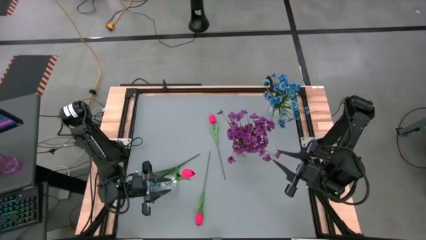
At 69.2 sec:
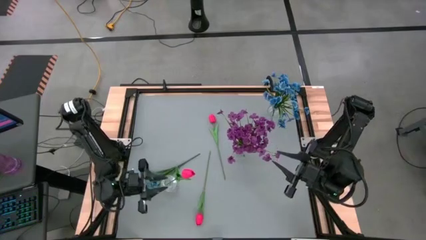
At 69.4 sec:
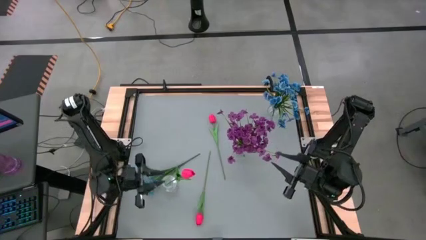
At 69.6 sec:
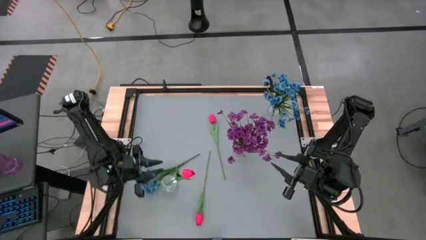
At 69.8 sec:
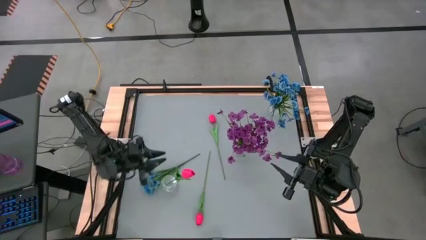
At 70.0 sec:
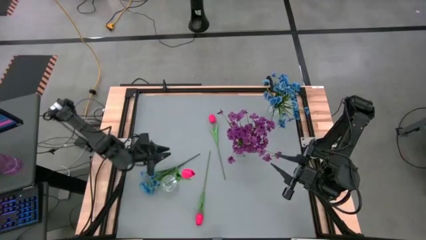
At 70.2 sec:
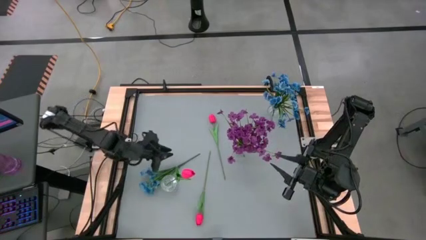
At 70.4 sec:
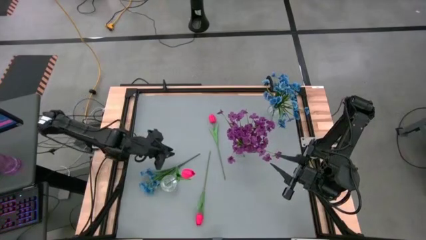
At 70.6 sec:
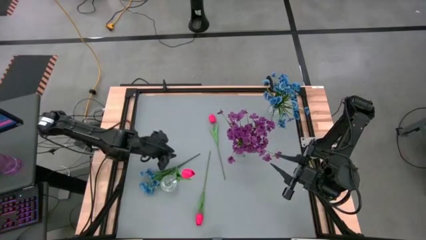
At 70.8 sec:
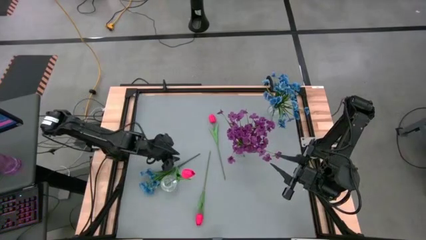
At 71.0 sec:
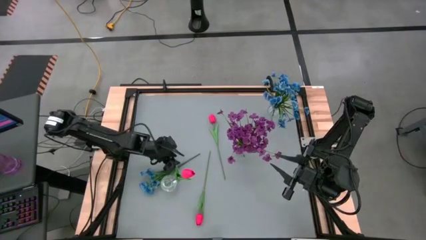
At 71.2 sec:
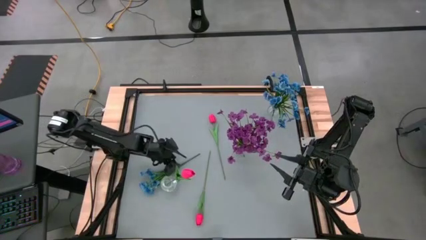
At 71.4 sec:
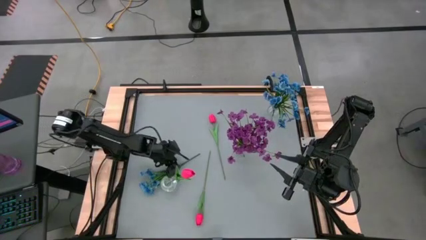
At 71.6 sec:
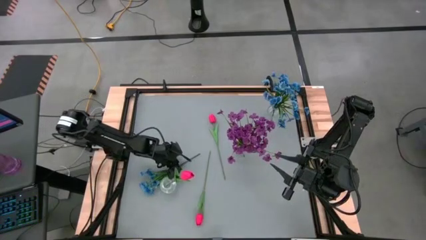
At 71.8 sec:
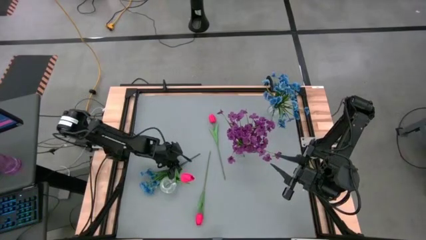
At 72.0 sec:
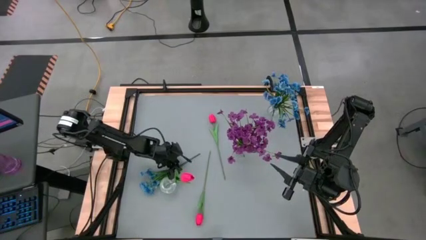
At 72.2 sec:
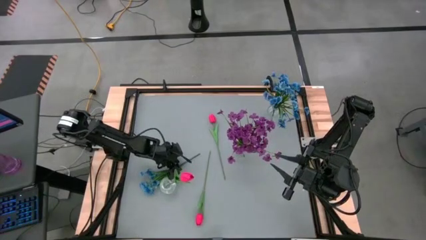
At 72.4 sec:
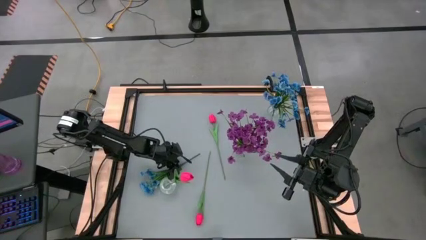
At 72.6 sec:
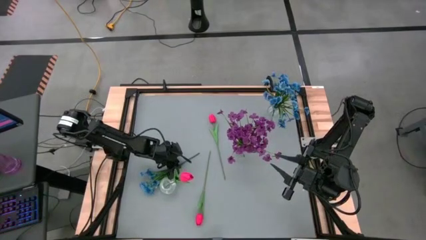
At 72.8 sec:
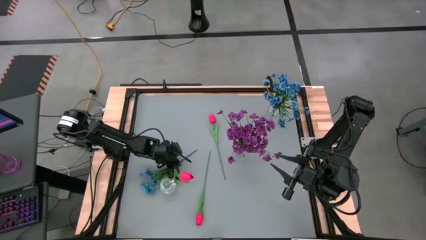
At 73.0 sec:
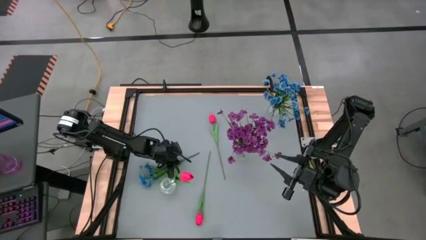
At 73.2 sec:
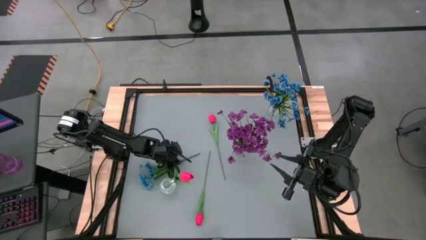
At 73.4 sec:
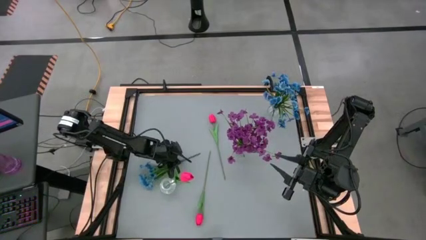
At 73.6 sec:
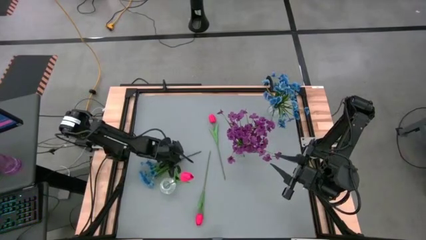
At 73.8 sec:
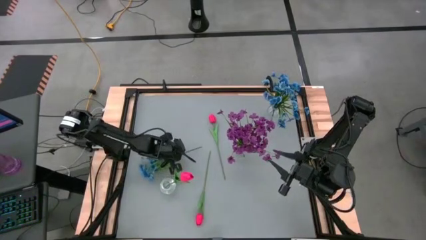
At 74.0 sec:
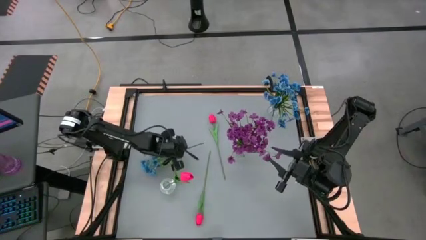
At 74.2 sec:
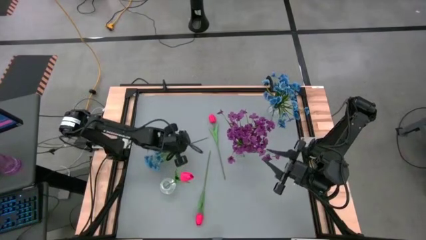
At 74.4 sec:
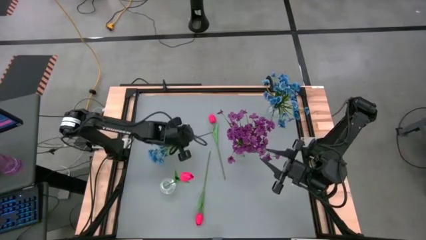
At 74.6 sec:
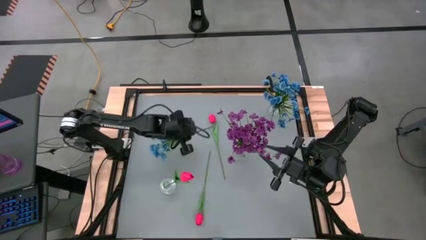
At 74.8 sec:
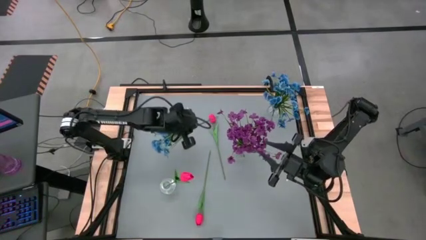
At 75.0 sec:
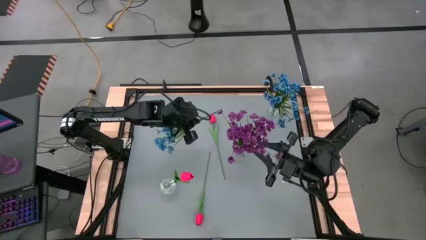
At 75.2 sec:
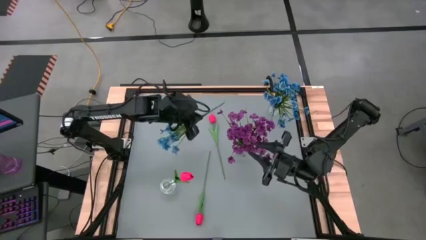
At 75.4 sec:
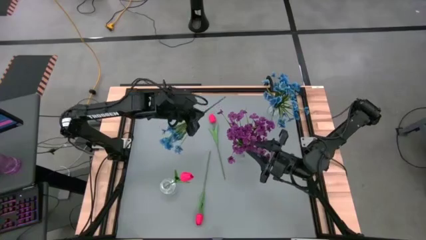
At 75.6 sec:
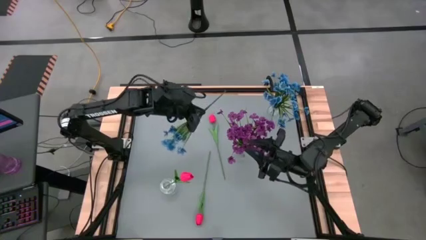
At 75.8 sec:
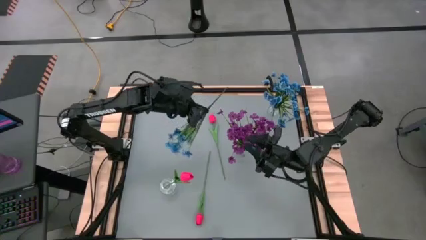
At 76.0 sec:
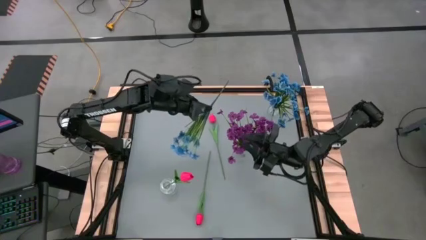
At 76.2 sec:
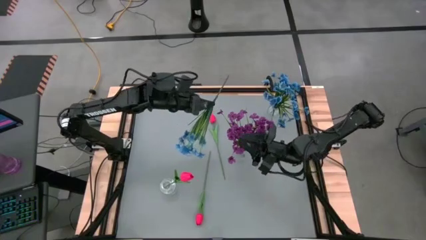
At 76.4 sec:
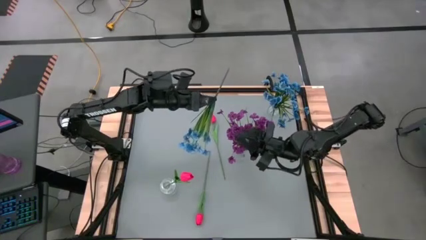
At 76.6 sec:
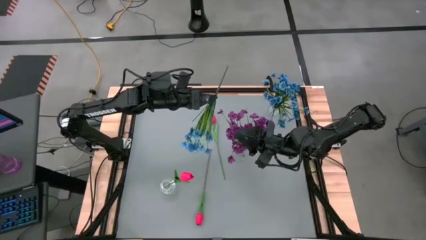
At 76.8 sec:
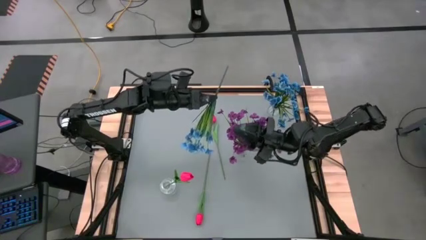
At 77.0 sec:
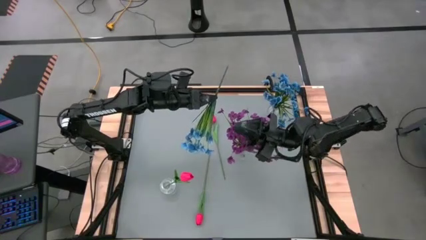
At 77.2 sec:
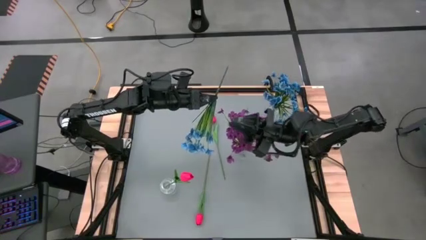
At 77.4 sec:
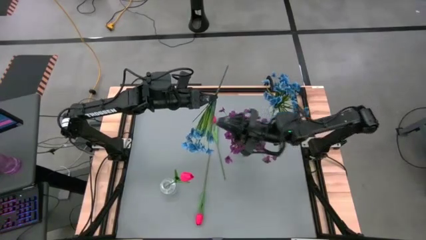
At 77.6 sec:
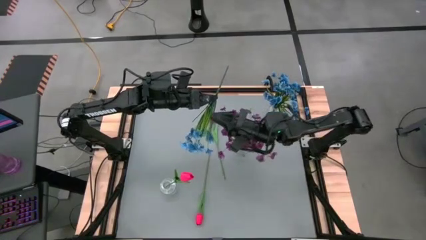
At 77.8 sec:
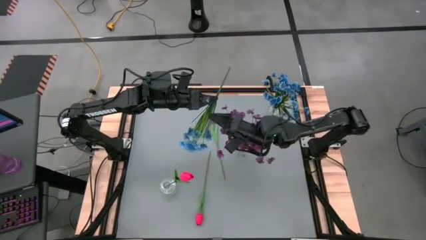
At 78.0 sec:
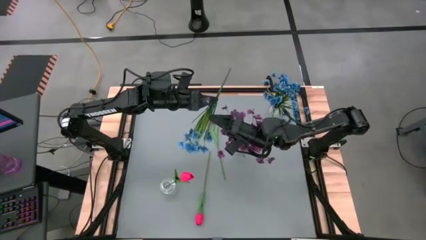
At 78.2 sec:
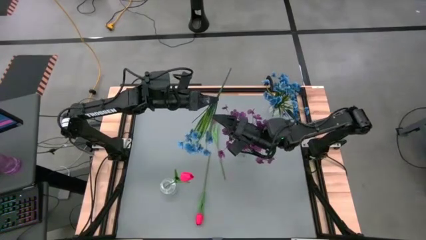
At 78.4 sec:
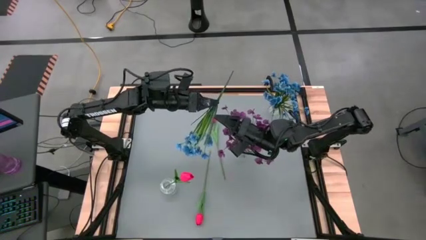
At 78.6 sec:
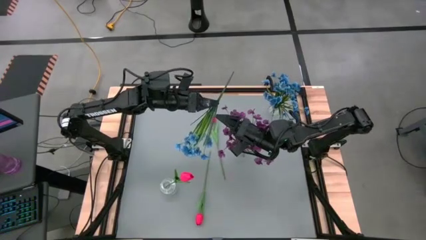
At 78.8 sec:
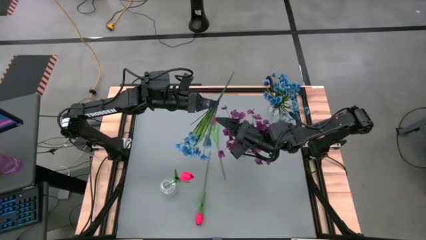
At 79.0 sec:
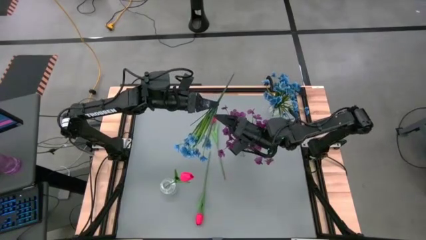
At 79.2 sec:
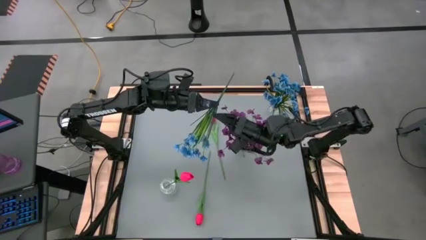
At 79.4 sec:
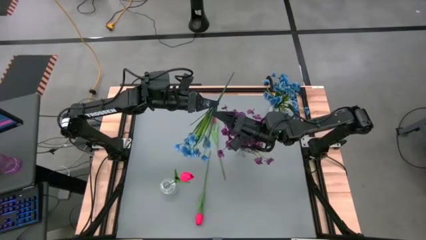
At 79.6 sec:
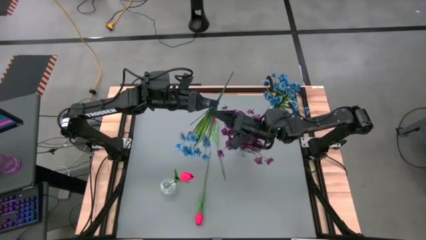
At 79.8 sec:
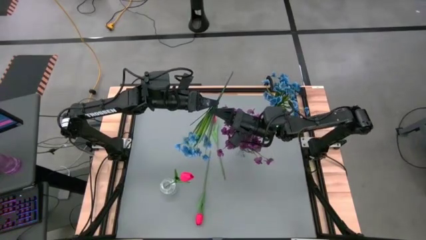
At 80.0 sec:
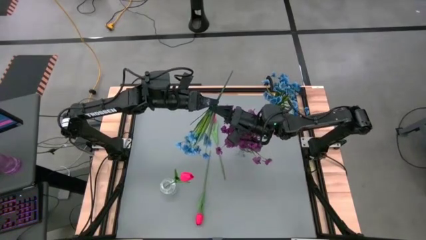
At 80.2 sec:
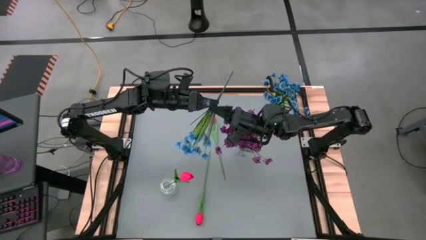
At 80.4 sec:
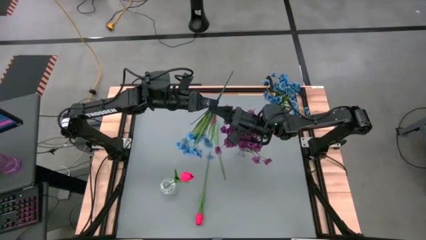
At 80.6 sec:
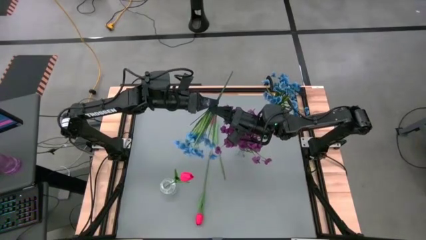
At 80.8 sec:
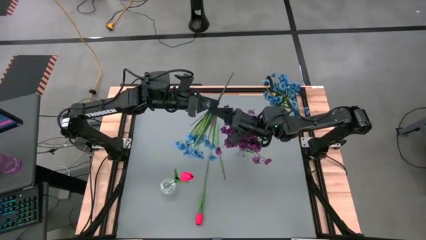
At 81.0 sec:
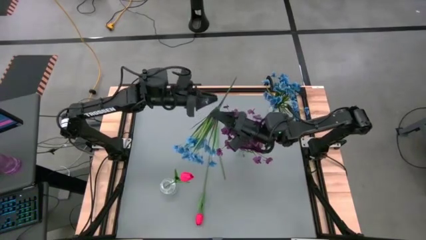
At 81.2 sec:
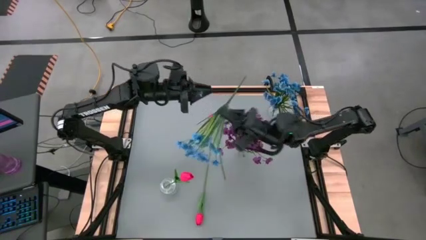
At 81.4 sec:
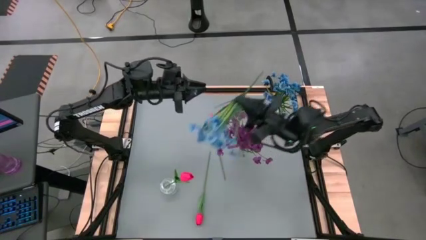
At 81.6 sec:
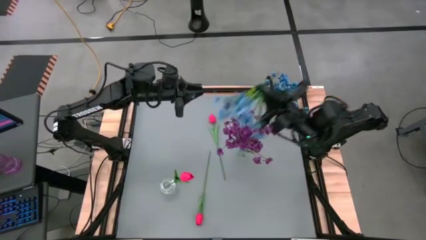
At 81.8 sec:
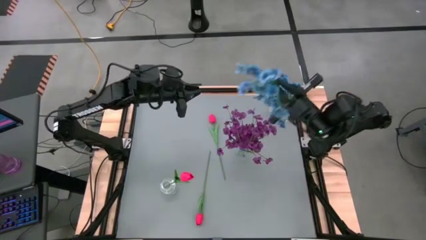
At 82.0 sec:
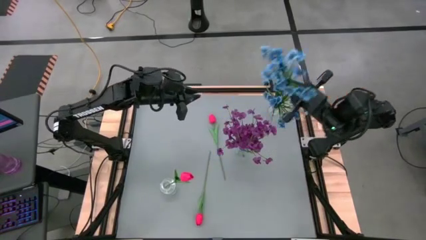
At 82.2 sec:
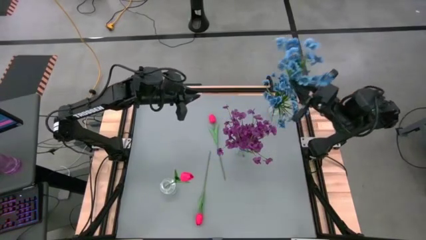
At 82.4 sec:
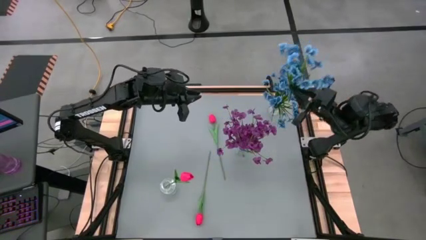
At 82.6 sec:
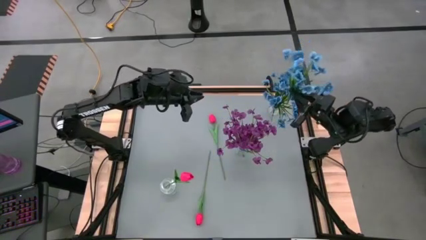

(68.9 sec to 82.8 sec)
Task: Sort flowers into vase by color
Put the blue flowers into the top transparent vase
